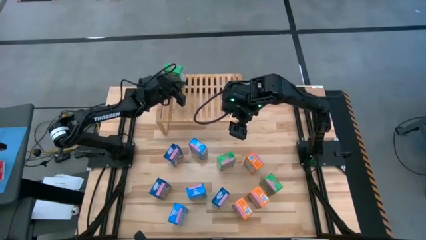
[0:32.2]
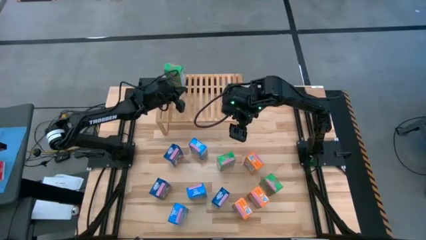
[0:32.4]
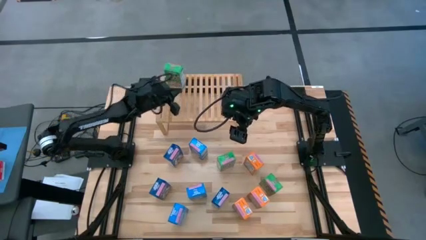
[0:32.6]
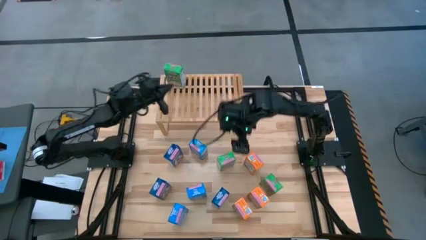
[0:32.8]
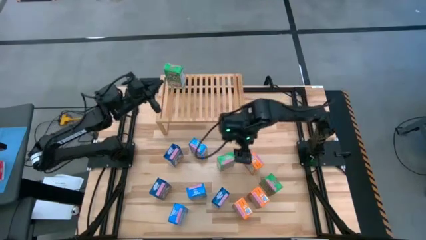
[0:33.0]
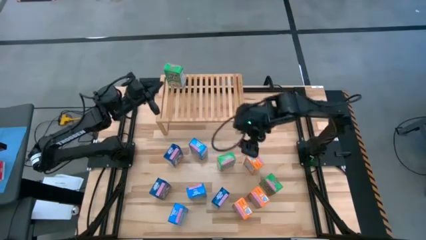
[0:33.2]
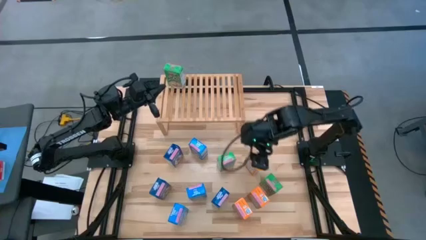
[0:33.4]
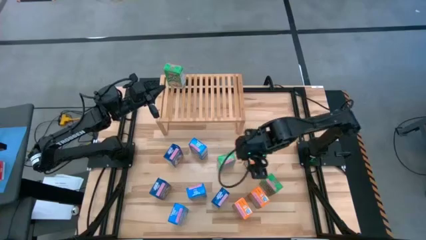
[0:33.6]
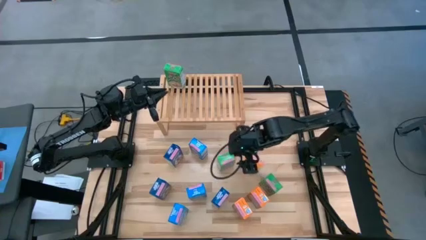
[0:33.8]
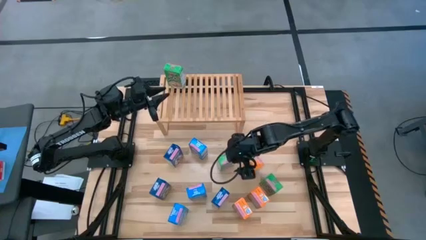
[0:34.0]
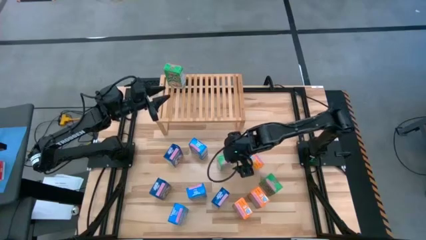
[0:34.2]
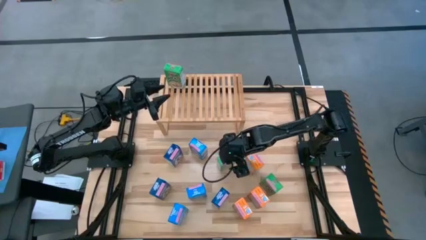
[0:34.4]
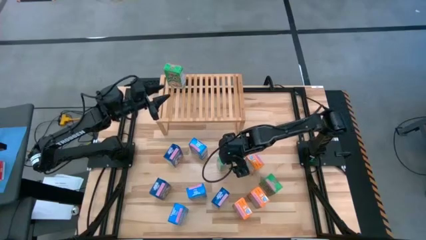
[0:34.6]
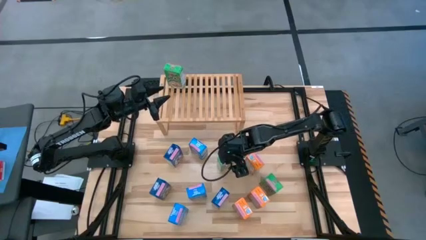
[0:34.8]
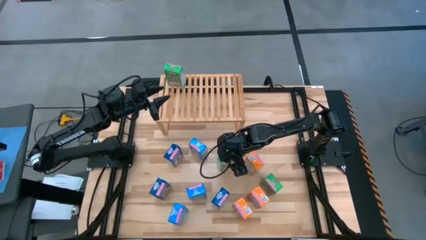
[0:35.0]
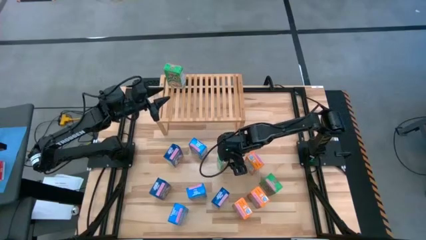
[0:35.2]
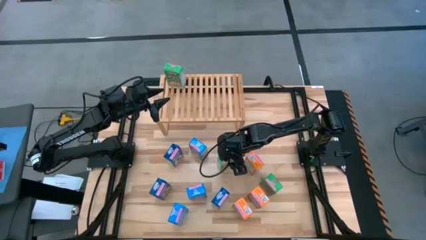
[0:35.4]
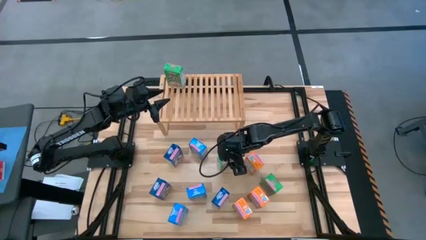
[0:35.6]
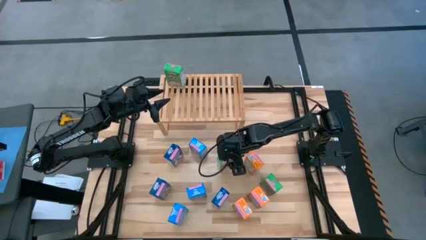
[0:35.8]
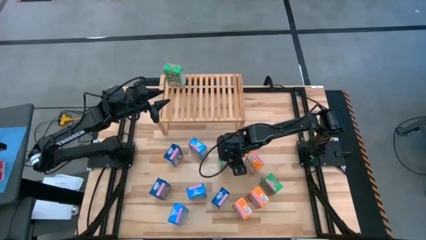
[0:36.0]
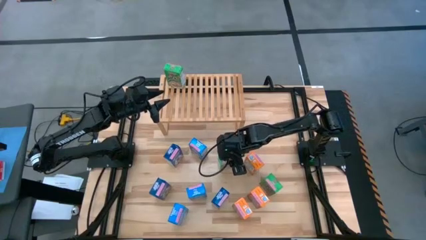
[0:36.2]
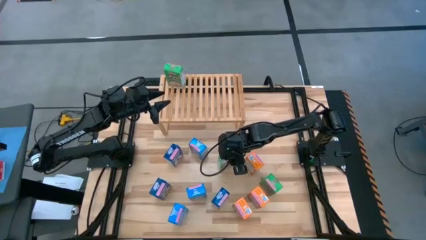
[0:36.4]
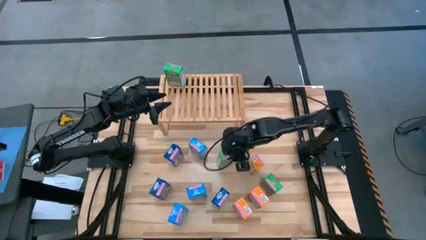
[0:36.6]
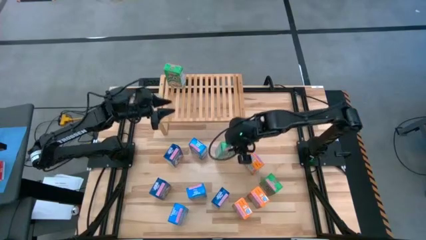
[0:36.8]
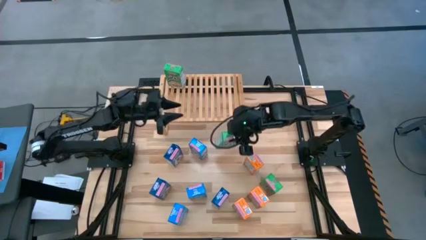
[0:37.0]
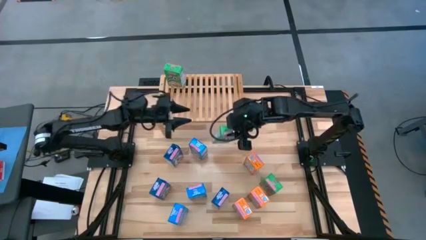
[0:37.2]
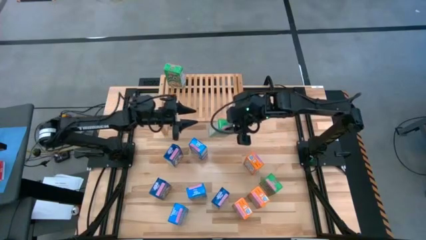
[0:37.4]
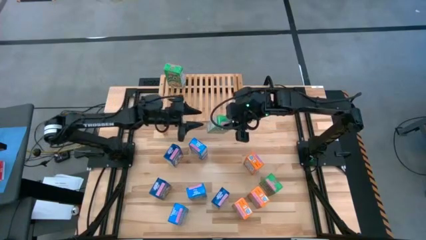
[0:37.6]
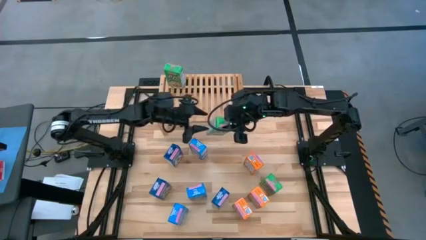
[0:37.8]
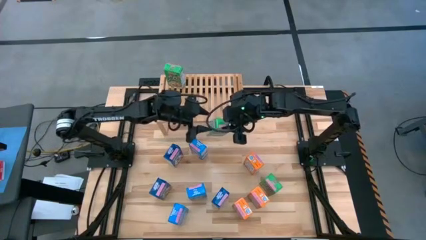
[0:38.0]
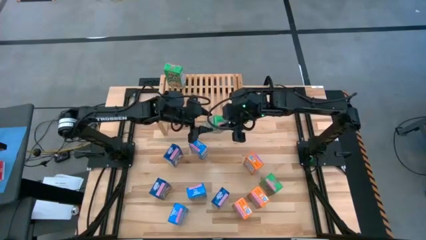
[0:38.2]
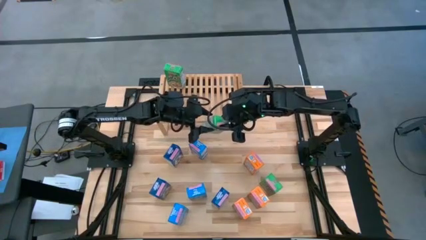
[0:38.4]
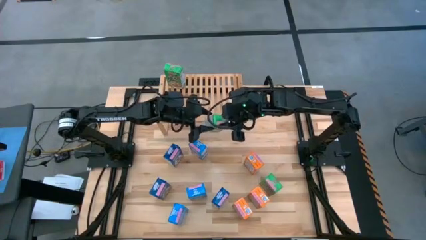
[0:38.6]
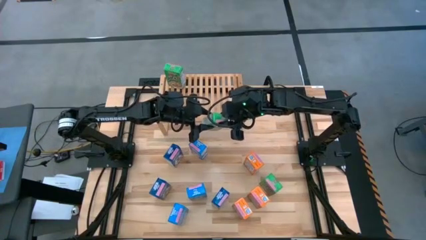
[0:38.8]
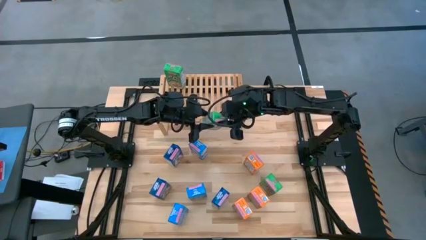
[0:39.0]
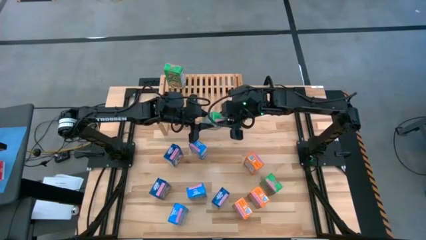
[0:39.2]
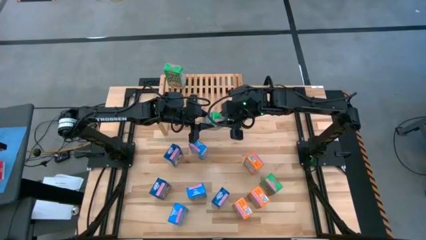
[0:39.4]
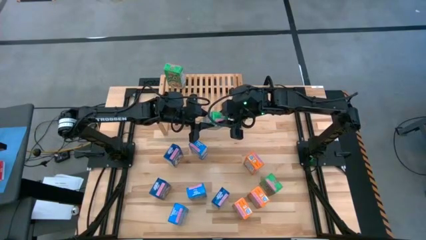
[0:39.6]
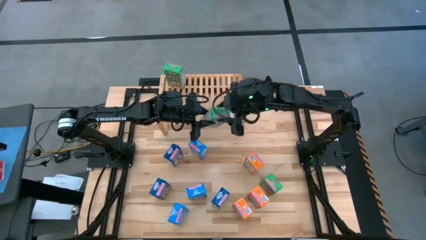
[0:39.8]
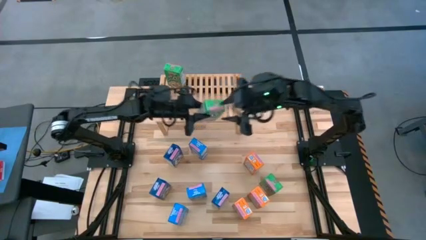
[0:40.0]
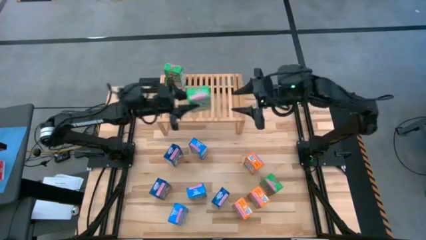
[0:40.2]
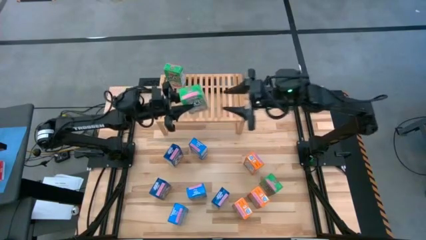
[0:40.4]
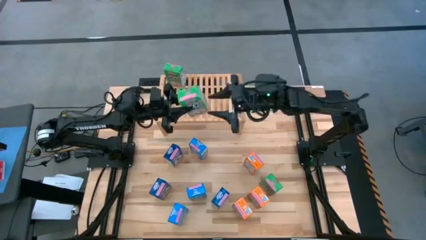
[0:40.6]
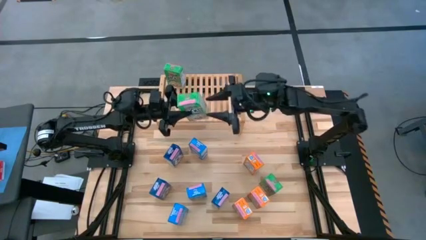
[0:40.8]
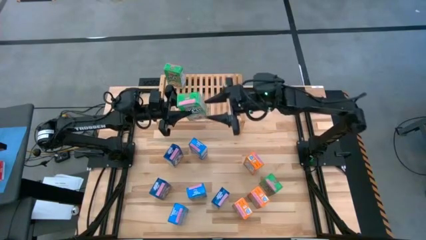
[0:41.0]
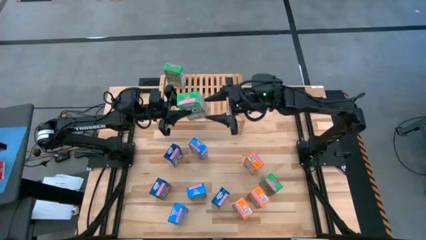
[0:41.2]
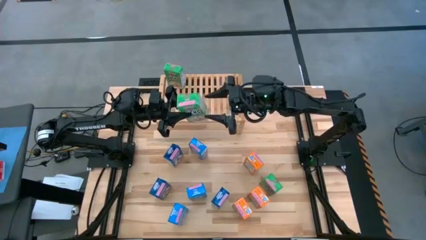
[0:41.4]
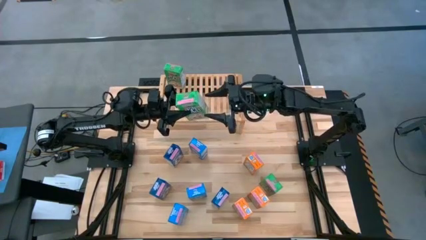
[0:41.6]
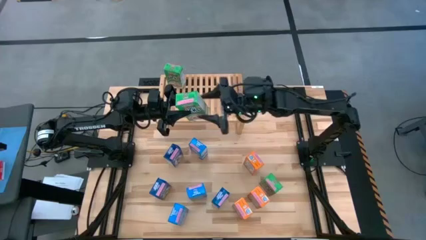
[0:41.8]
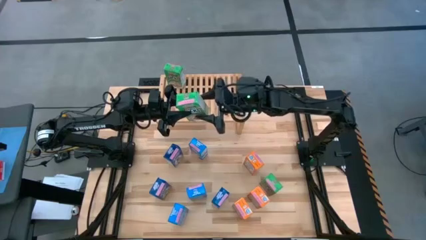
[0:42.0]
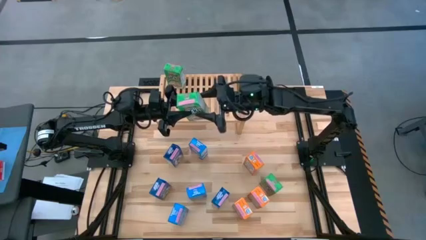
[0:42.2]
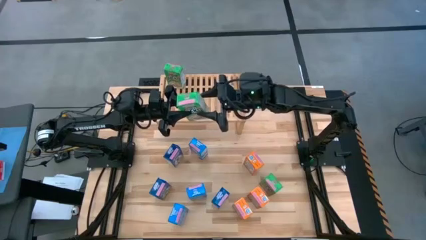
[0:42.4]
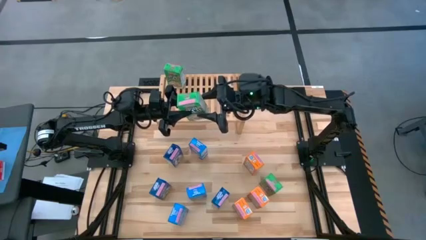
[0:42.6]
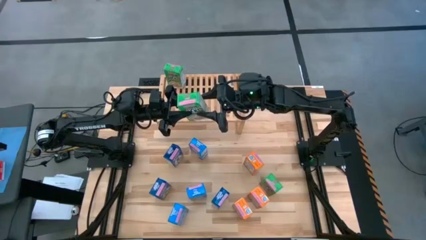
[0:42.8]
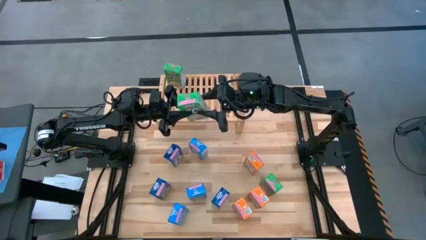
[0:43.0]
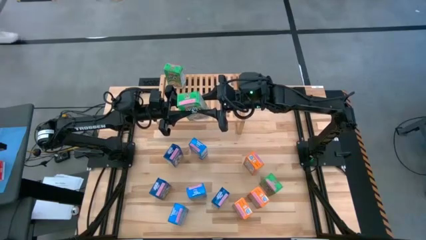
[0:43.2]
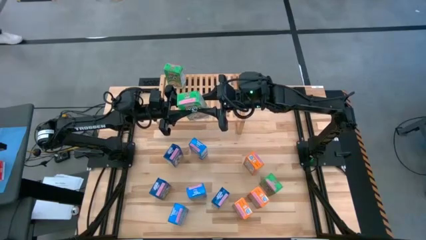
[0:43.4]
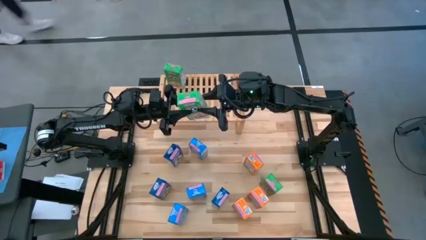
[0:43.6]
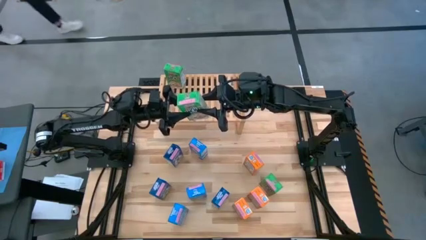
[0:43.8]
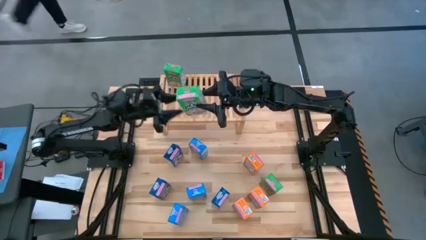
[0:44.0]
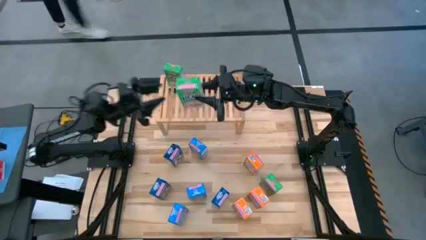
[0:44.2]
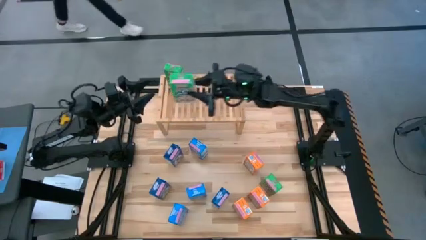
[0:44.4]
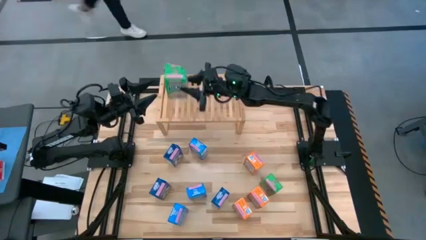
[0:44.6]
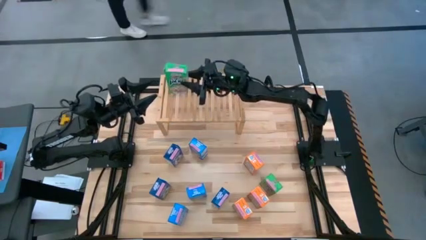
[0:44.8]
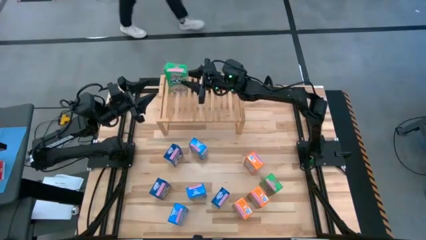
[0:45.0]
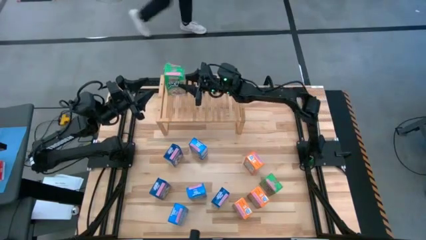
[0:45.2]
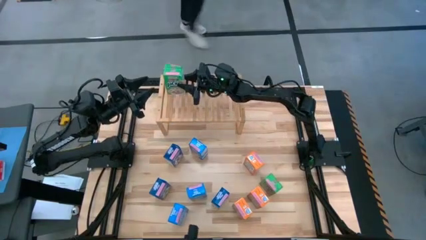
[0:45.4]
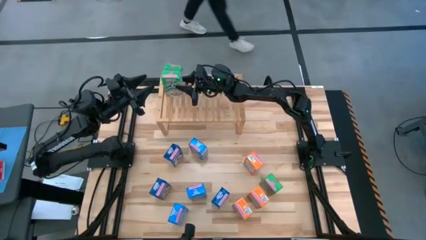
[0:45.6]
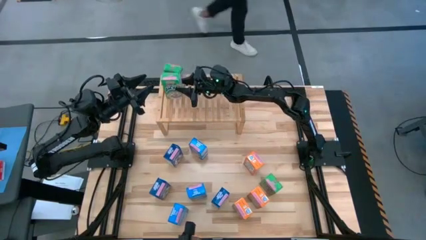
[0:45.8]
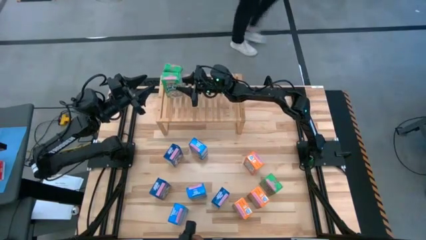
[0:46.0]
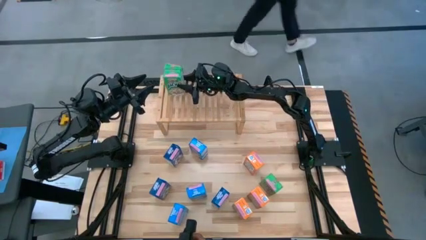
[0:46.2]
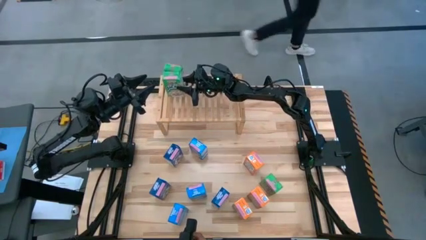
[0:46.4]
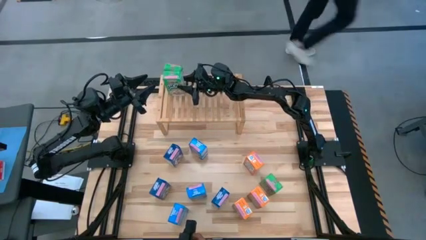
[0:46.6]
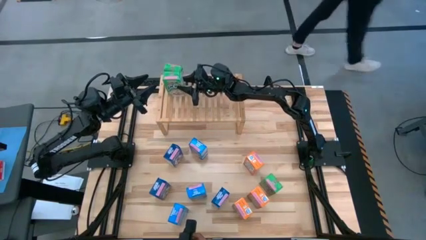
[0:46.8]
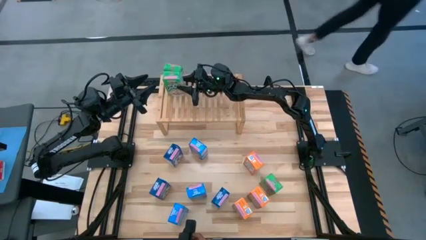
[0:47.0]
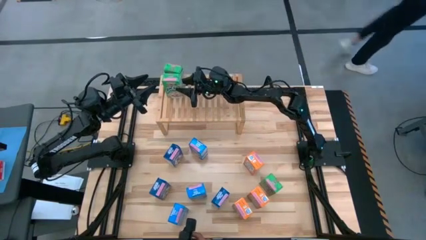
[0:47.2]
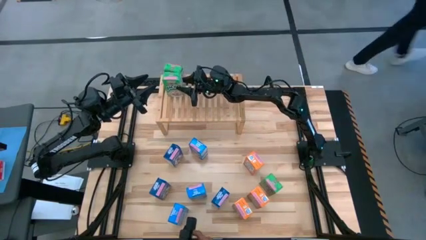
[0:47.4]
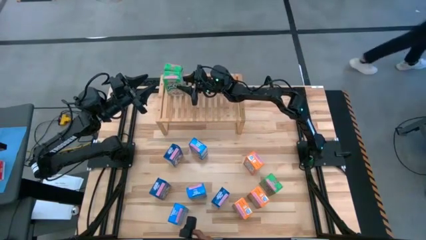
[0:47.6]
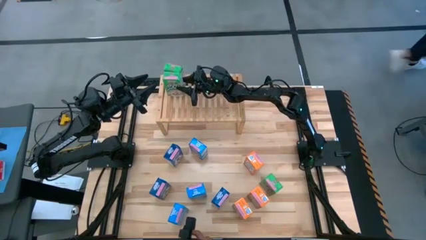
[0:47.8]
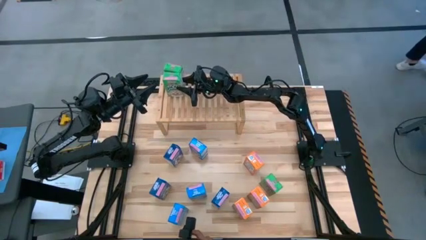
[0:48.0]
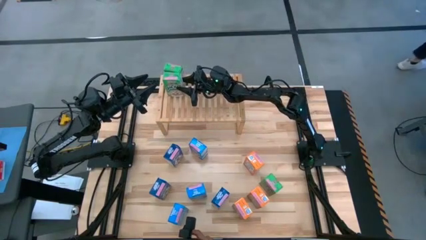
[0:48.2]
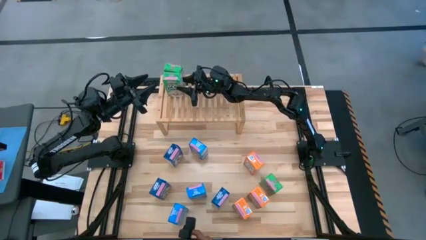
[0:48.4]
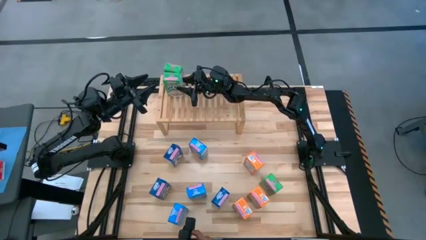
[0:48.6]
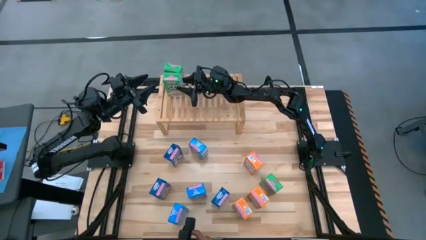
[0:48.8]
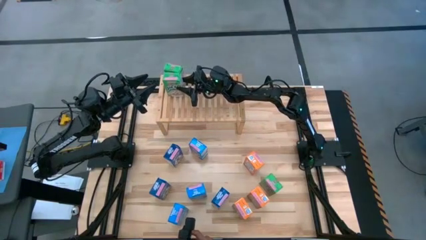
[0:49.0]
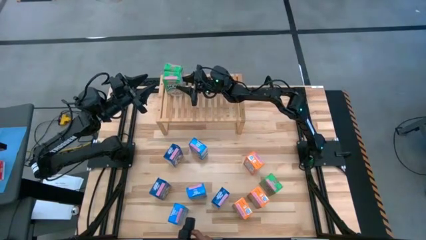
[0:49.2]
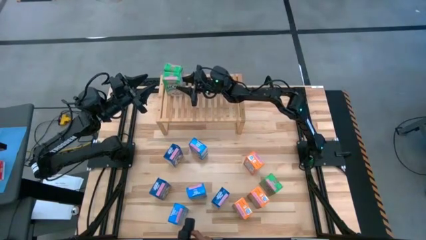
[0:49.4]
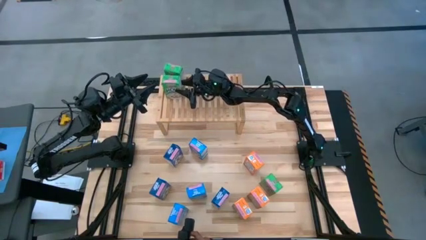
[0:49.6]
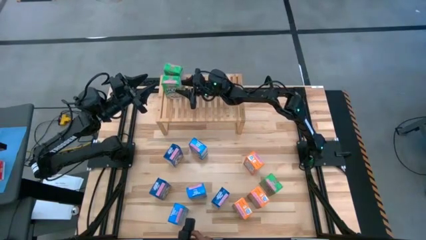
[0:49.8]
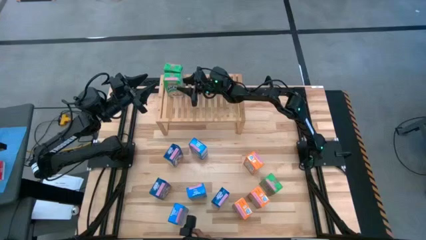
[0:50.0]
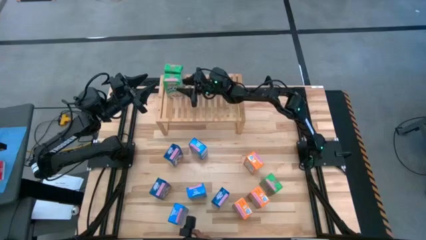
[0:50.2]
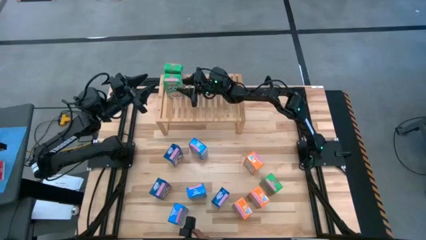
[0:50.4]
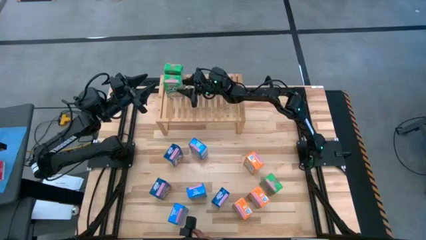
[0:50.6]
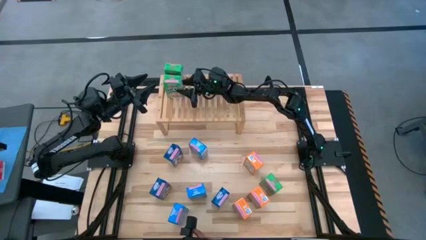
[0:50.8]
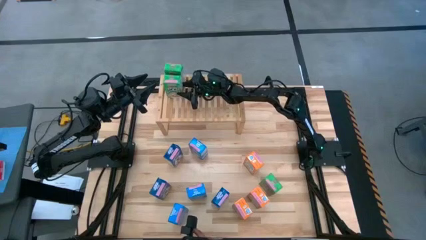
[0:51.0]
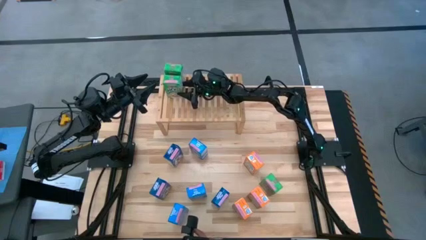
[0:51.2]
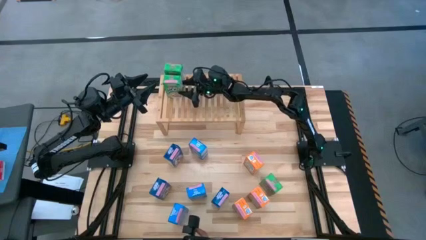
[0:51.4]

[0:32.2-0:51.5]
Task: Stack cereal on shelf
Put the top green cereal box on the shelf aligned with the other green cereal box
